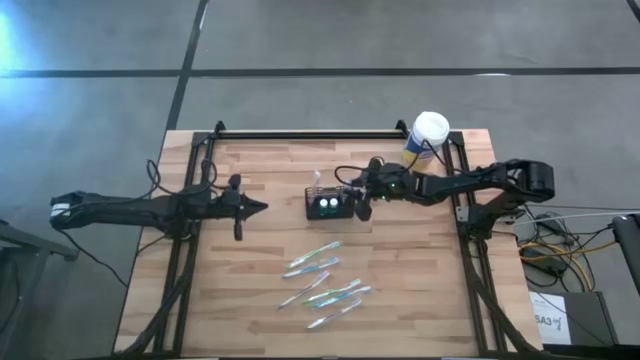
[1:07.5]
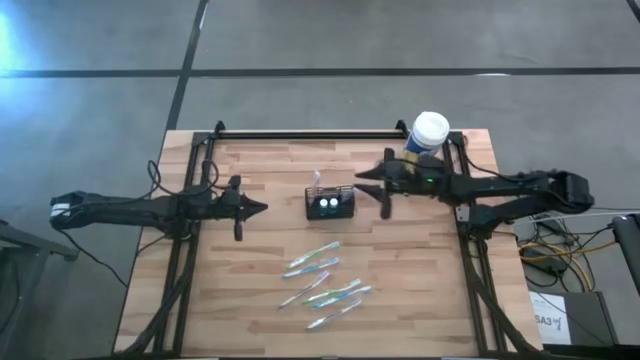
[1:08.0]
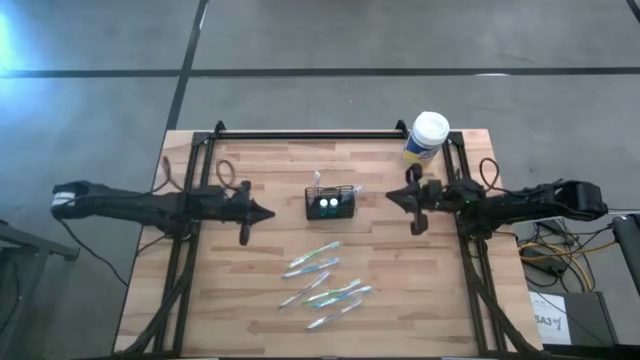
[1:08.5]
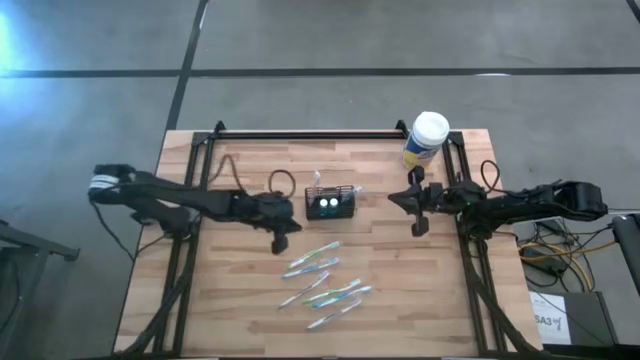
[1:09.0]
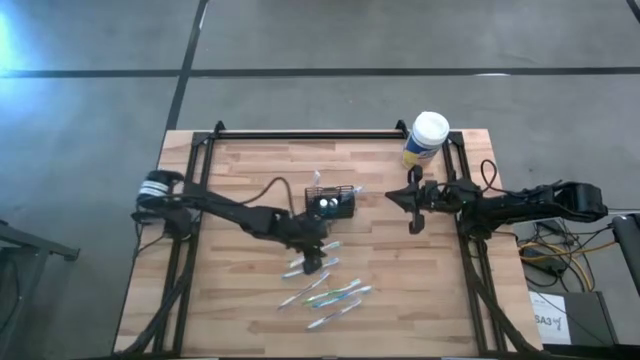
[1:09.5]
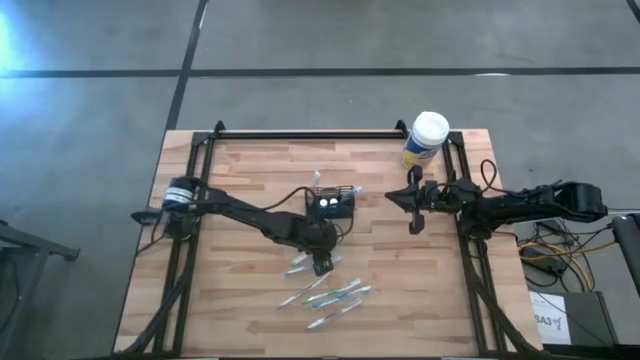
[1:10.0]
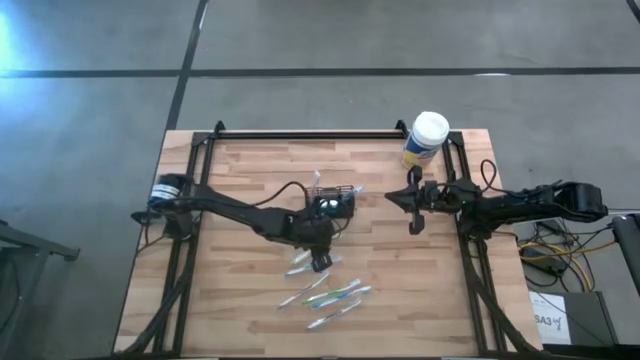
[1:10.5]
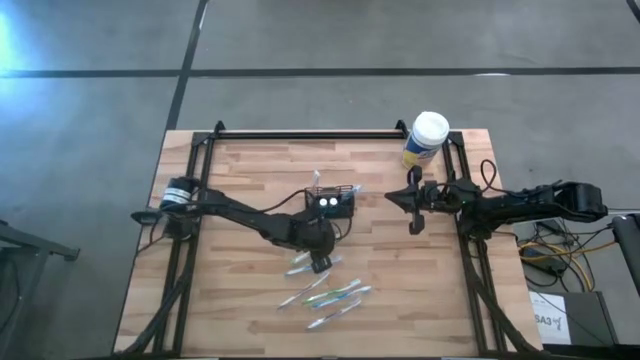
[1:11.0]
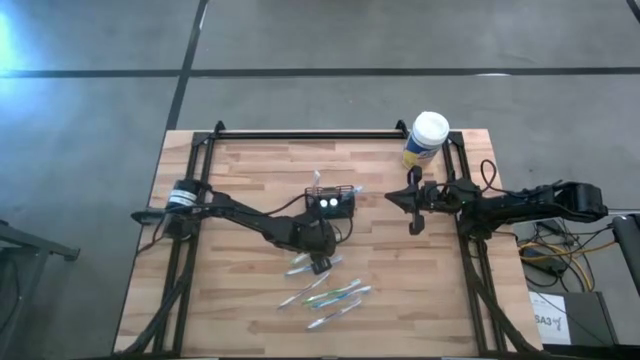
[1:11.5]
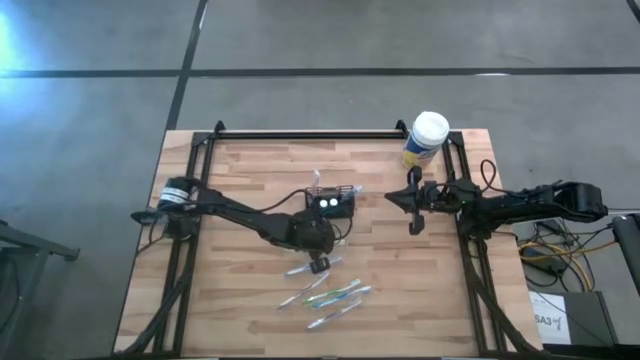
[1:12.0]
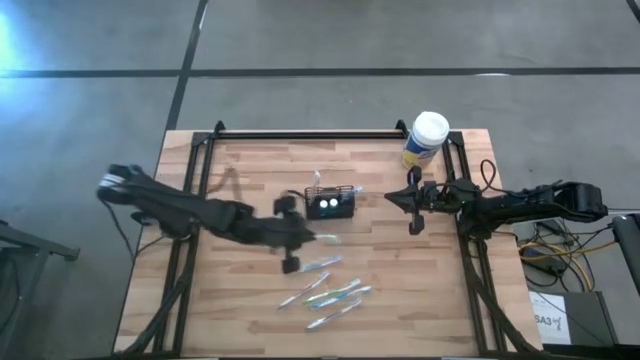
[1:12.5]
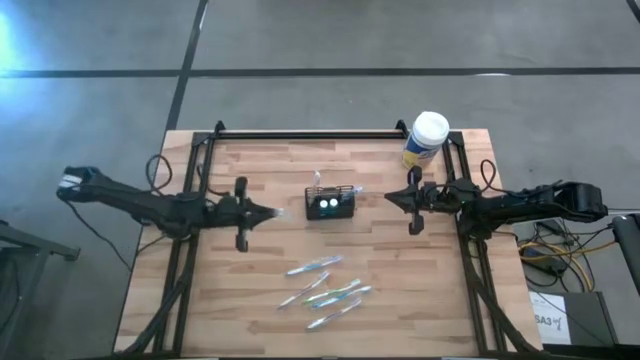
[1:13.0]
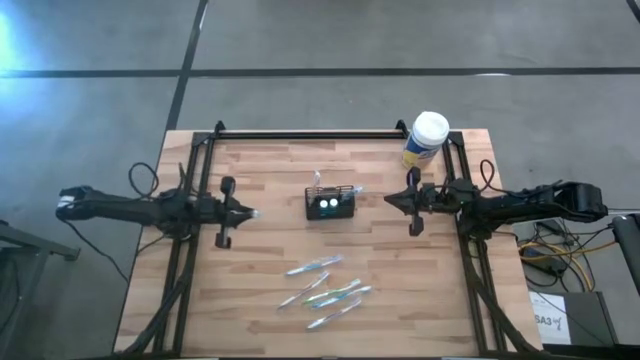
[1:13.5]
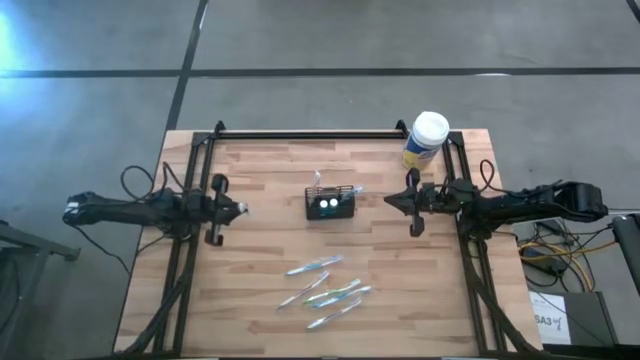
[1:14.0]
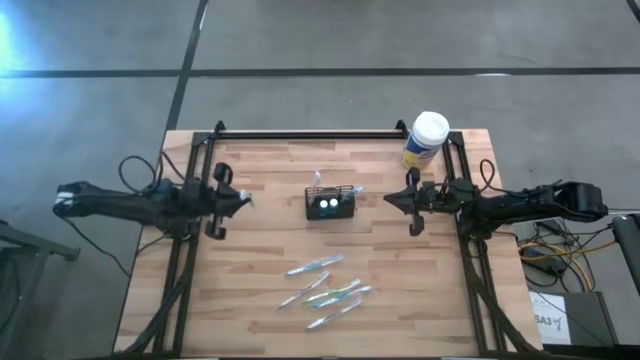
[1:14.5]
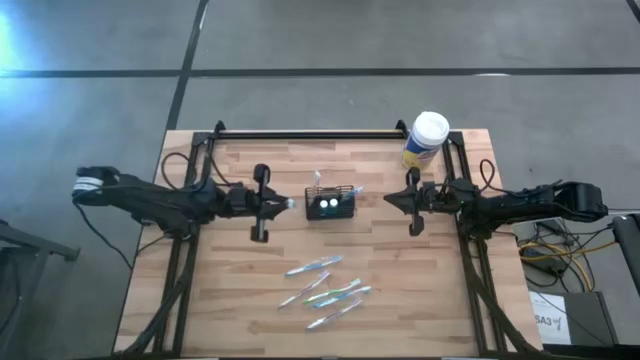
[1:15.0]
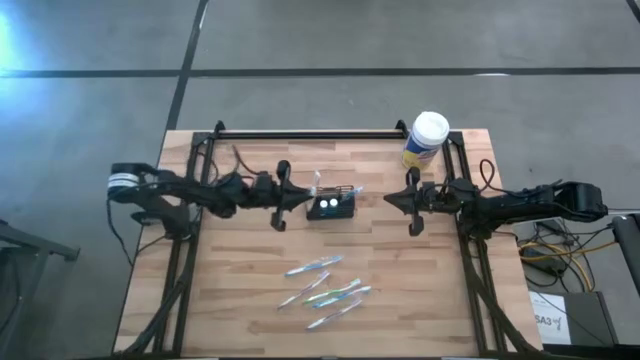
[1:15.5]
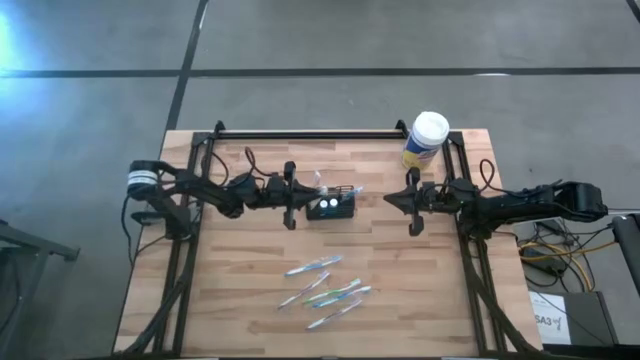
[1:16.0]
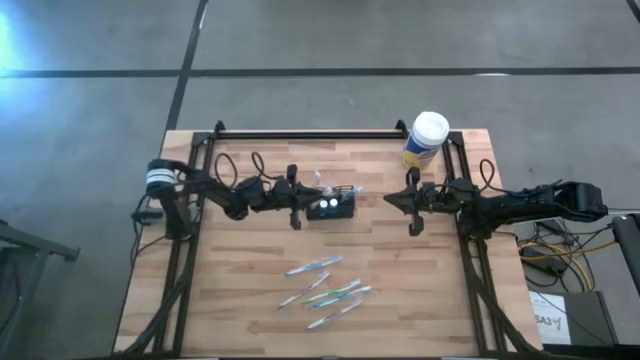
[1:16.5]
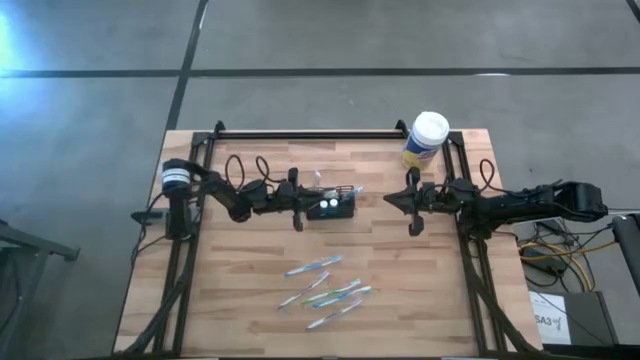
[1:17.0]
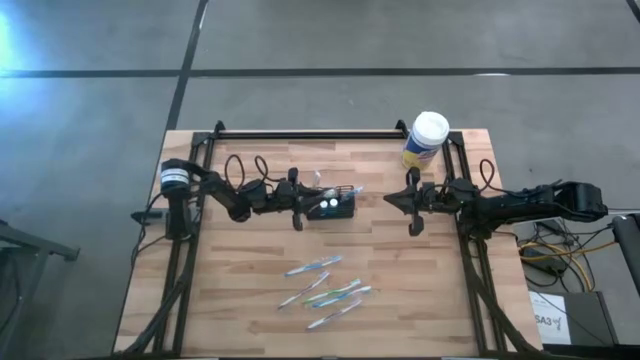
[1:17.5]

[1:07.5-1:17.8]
Task: Pick & Place toothbrushing station
Put the top green toothbrush in the wire organizer

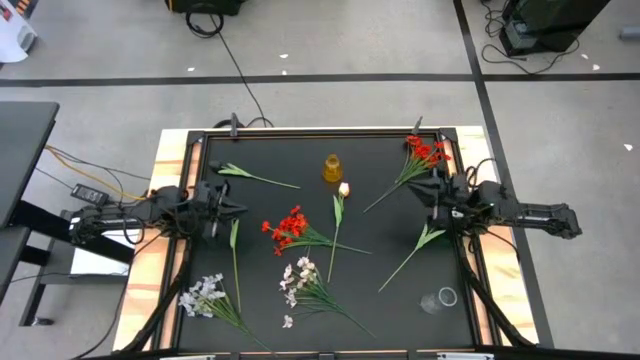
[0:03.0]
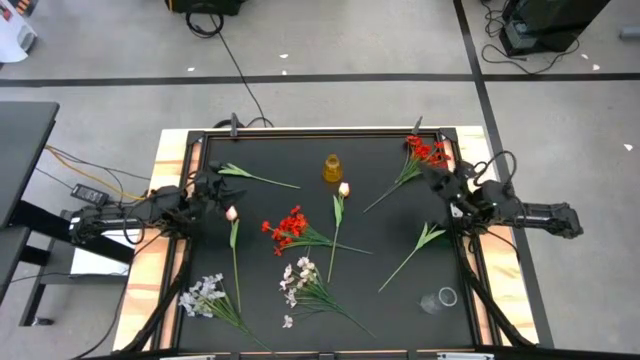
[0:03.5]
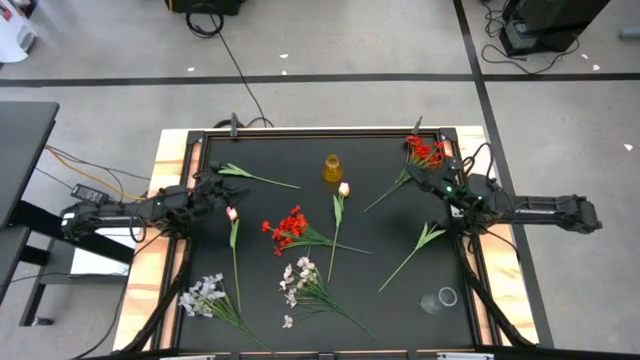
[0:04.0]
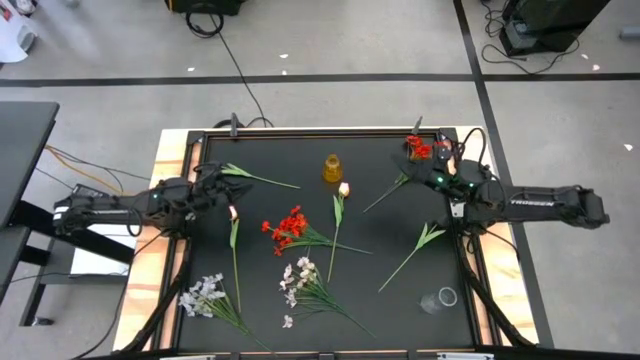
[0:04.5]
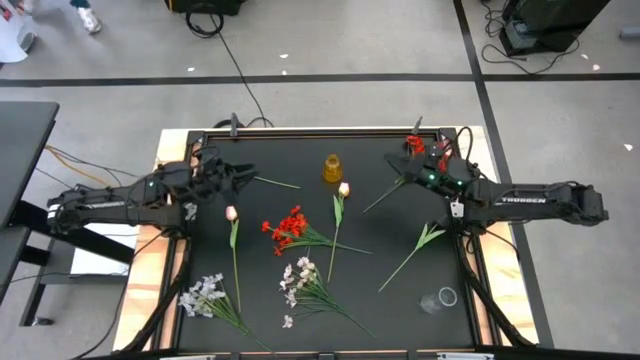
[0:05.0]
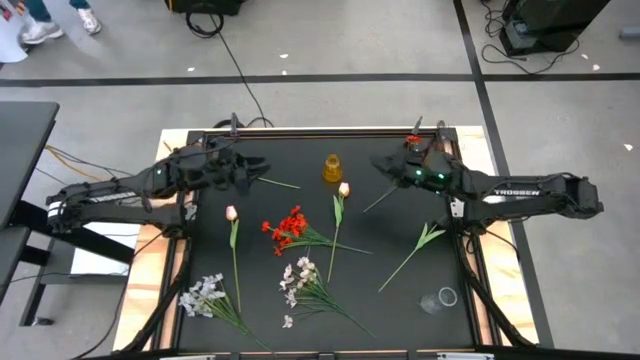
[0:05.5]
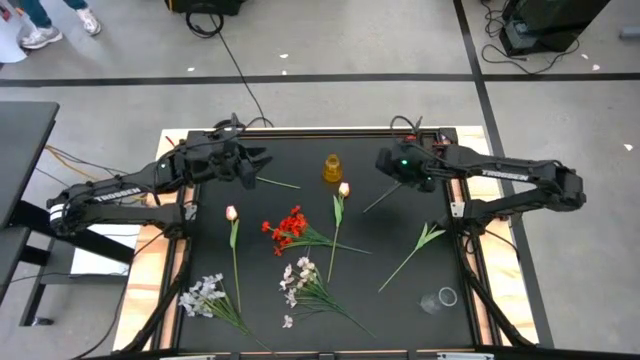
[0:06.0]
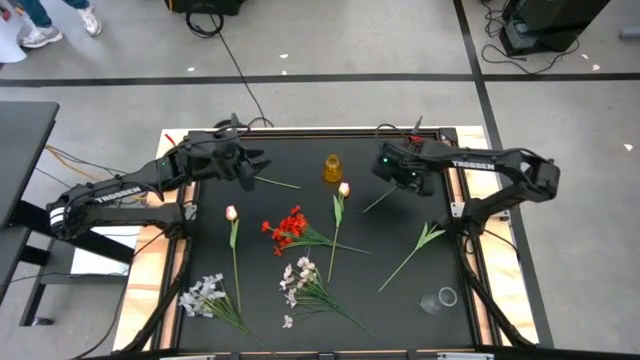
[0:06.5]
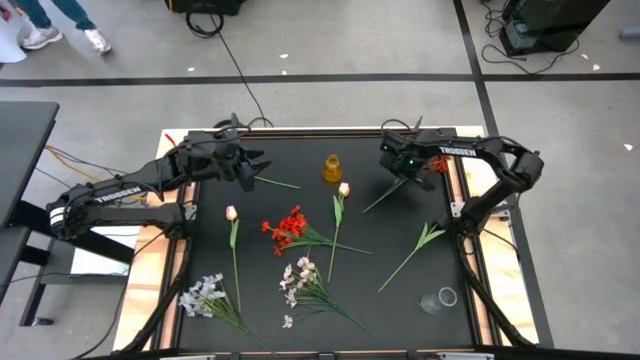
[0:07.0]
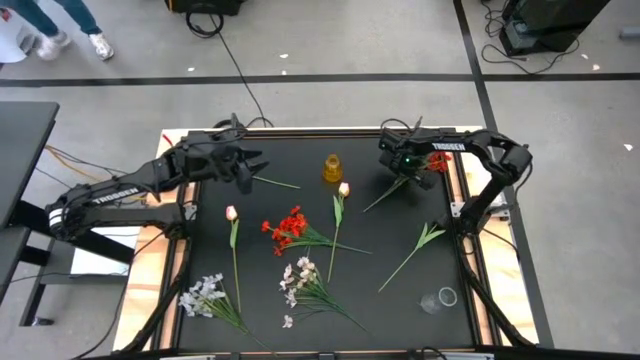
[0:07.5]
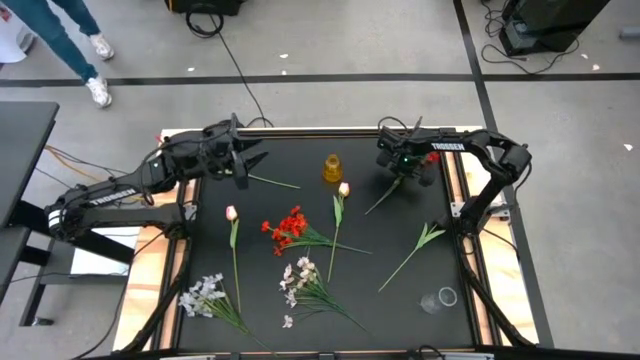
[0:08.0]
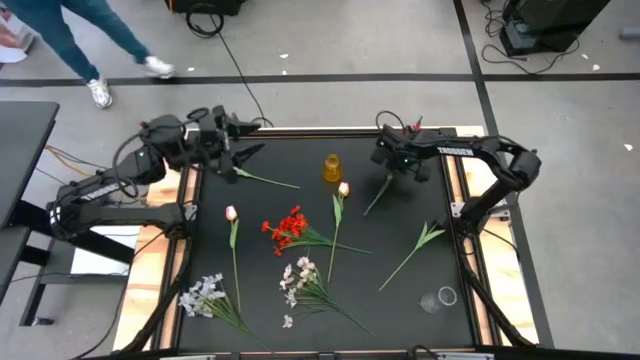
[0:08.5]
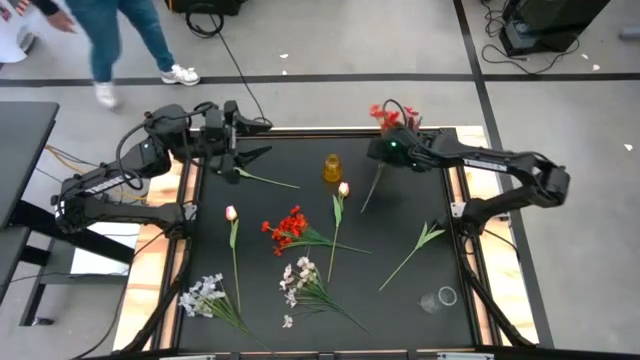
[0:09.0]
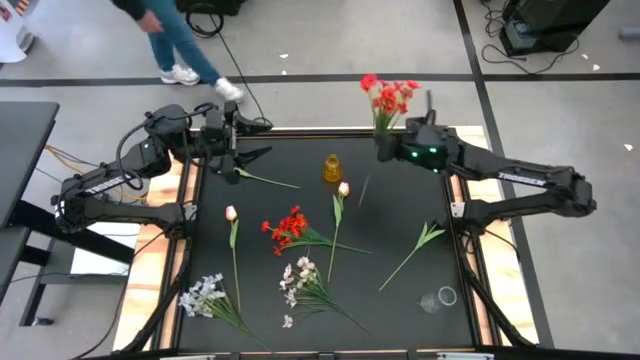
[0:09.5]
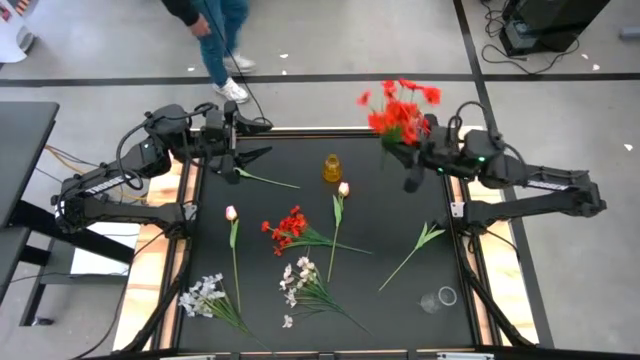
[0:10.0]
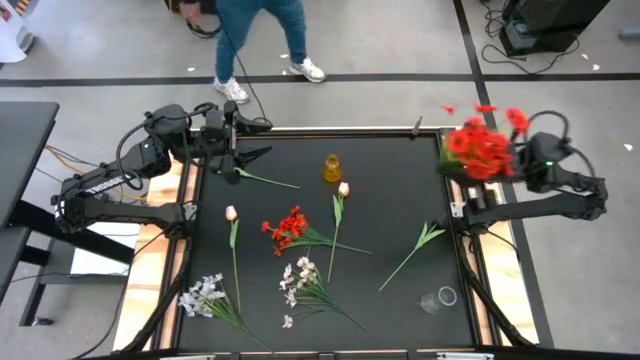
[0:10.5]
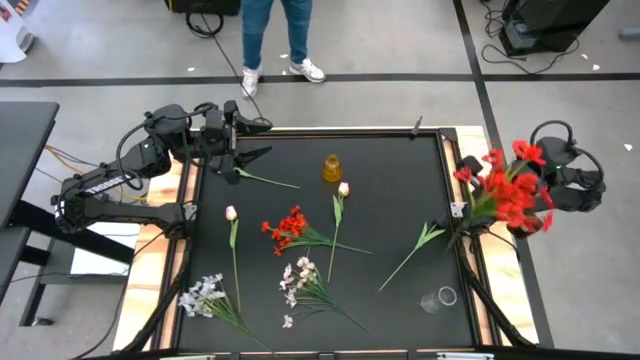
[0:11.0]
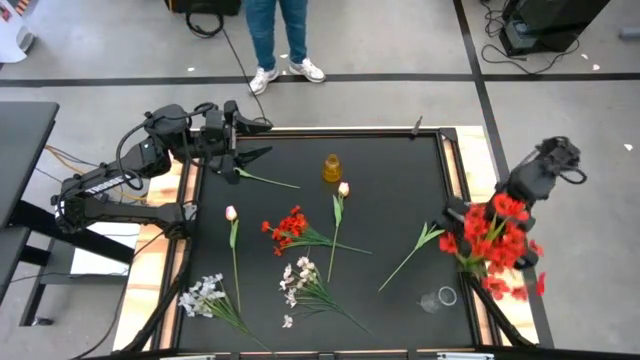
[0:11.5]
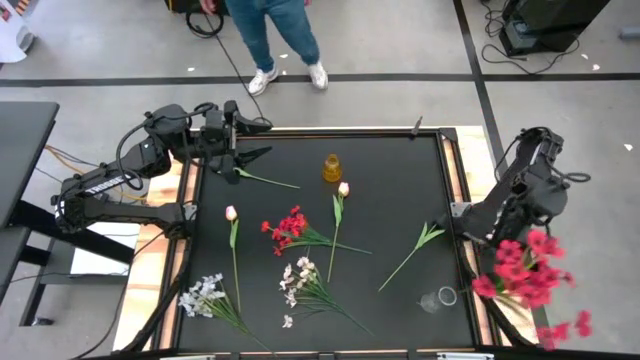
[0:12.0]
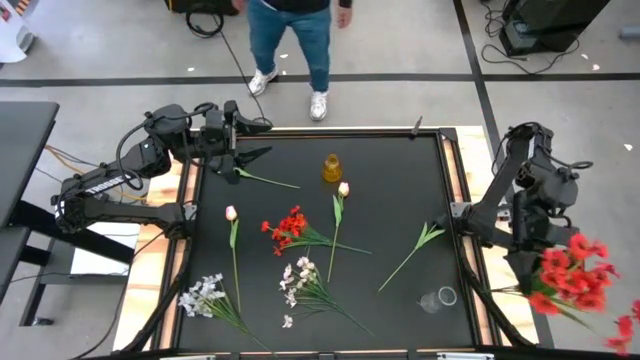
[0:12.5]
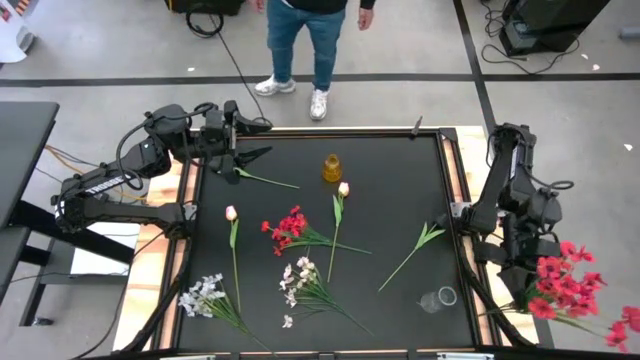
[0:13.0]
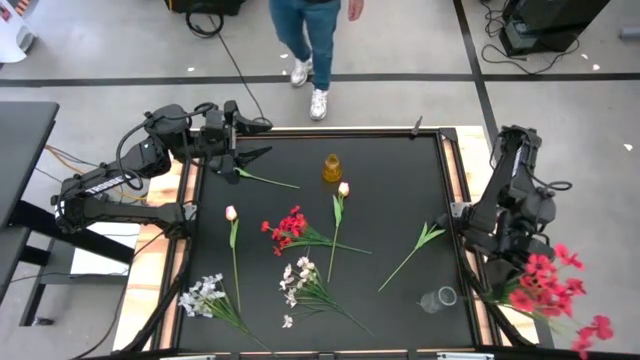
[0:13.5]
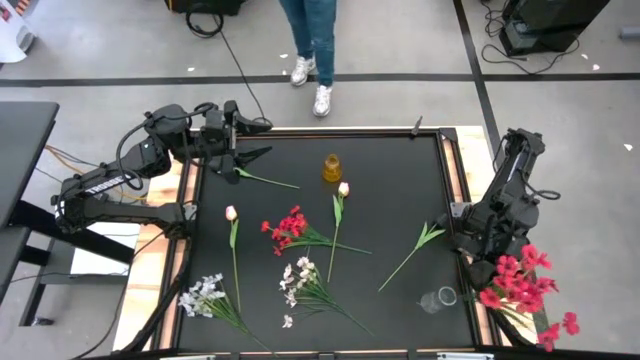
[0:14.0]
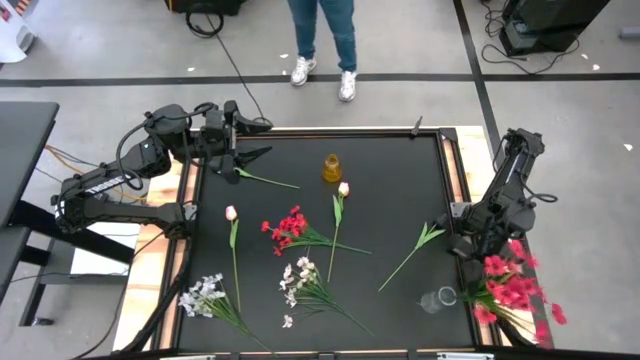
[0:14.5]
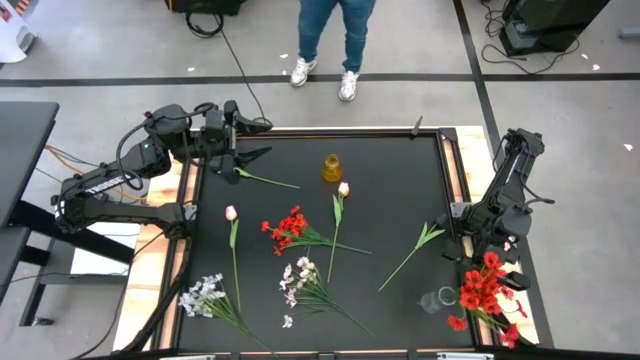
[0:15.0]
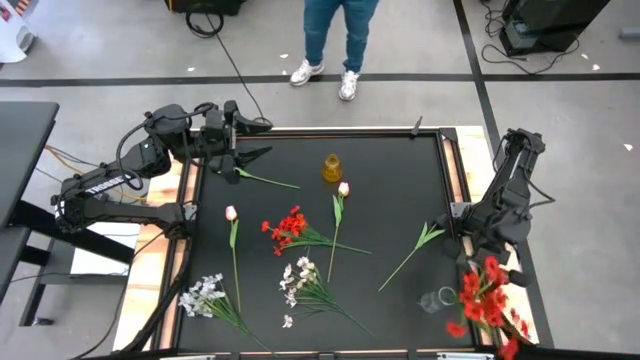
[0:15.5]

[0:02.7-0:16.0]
Task: Sort flowers into vase by color
Put the top red flowers into the transparent vase
